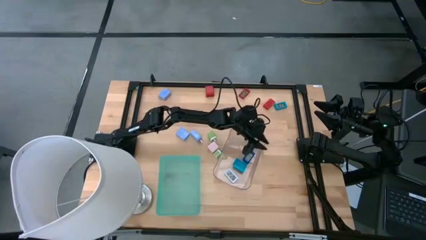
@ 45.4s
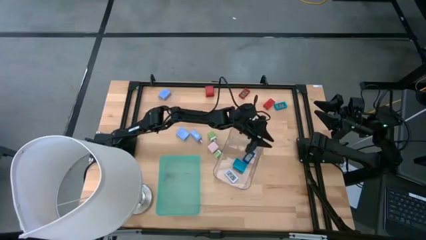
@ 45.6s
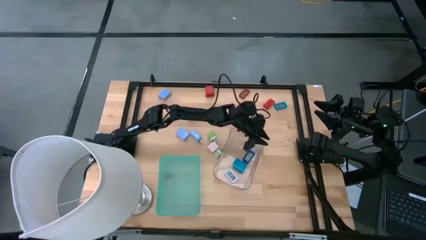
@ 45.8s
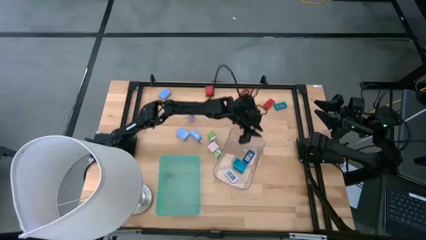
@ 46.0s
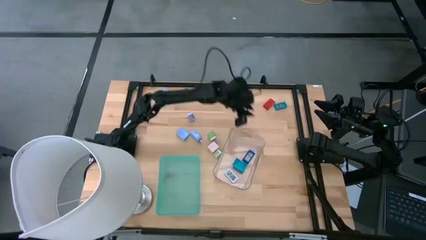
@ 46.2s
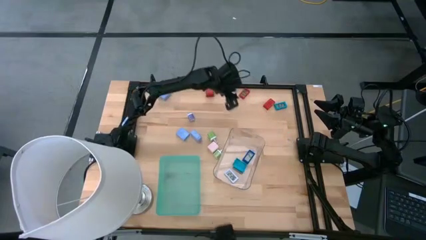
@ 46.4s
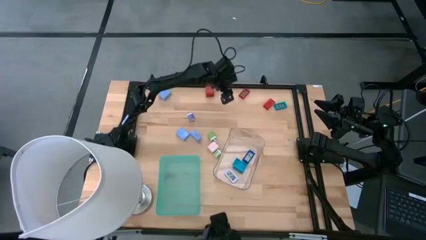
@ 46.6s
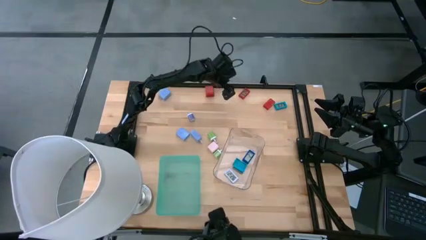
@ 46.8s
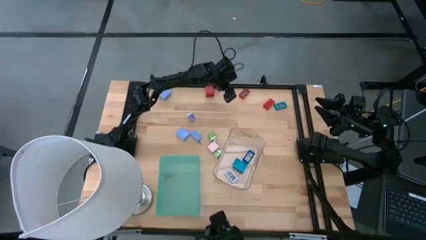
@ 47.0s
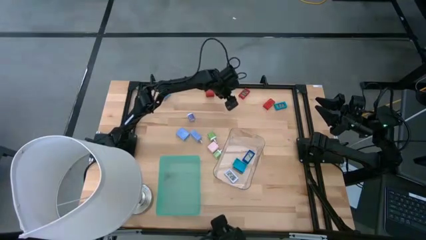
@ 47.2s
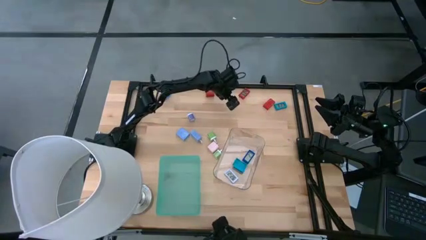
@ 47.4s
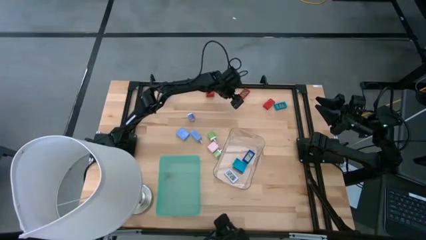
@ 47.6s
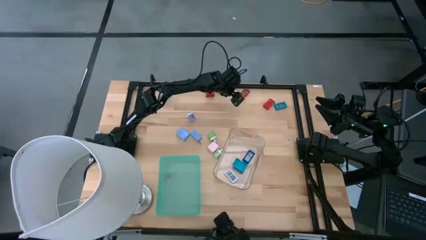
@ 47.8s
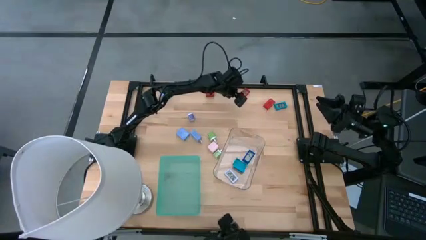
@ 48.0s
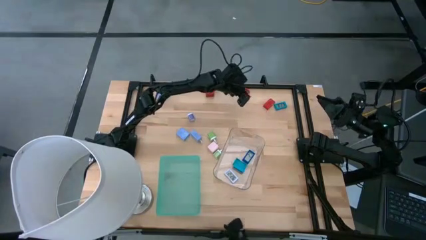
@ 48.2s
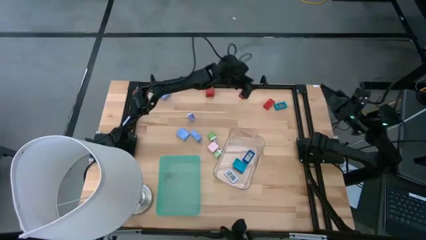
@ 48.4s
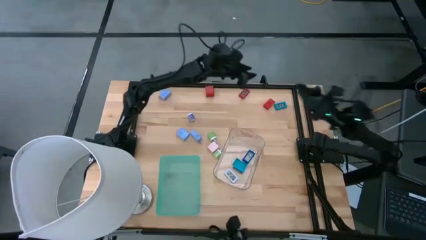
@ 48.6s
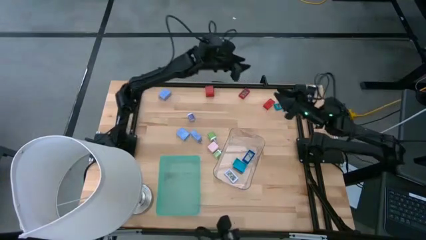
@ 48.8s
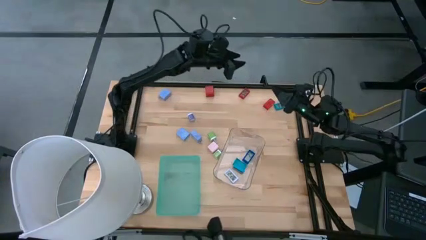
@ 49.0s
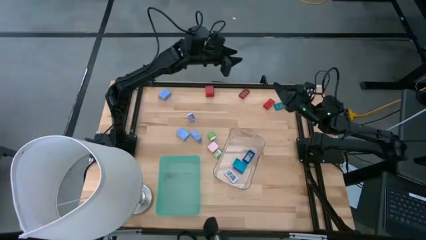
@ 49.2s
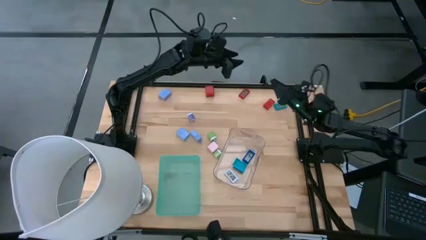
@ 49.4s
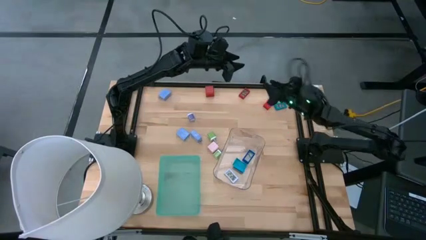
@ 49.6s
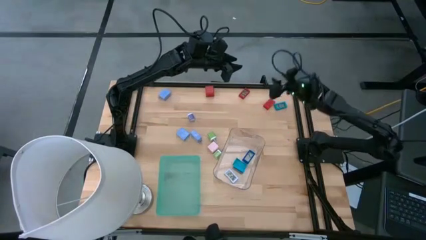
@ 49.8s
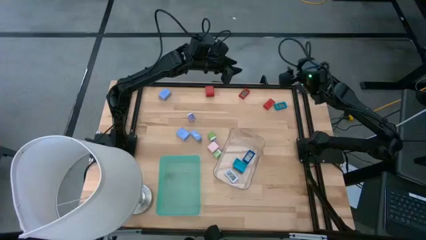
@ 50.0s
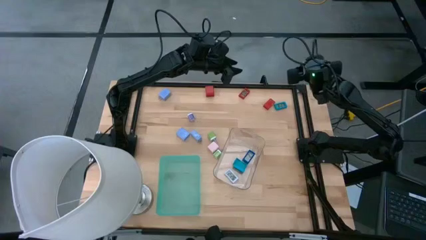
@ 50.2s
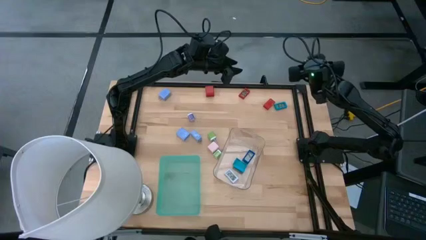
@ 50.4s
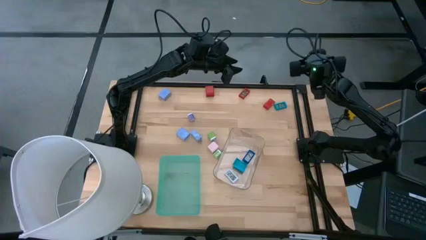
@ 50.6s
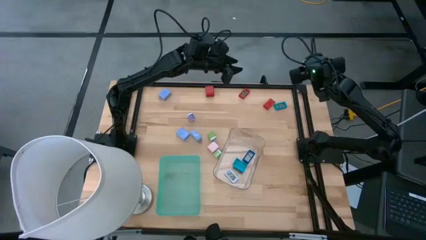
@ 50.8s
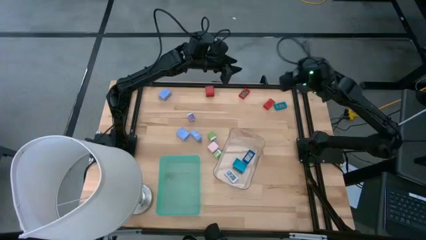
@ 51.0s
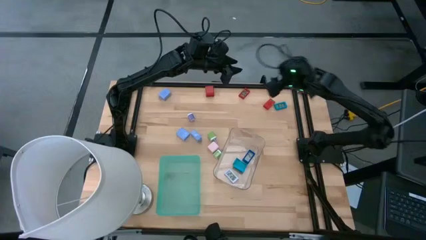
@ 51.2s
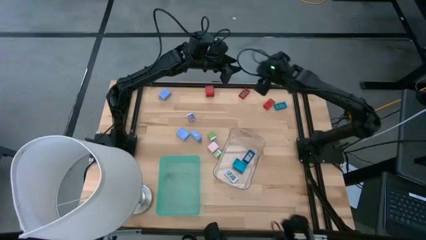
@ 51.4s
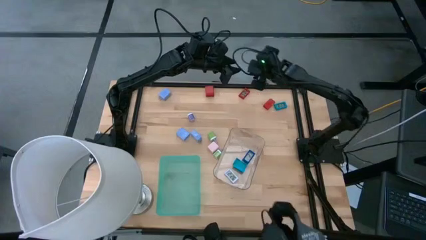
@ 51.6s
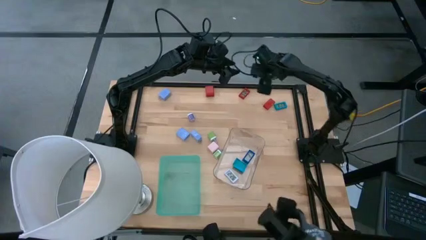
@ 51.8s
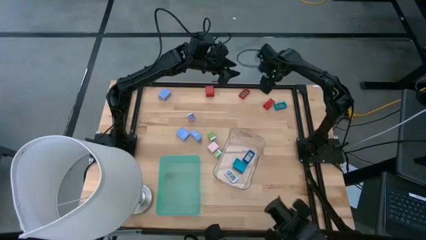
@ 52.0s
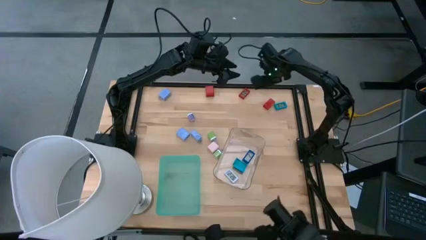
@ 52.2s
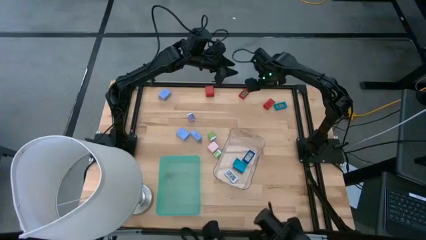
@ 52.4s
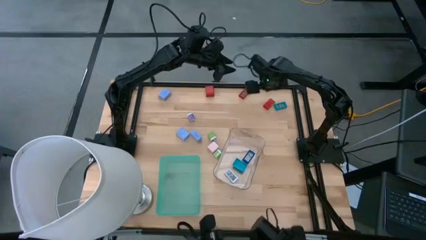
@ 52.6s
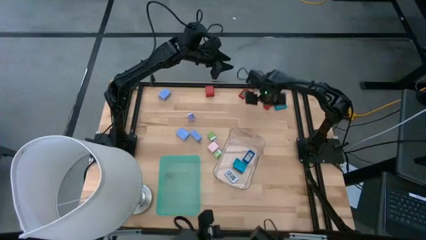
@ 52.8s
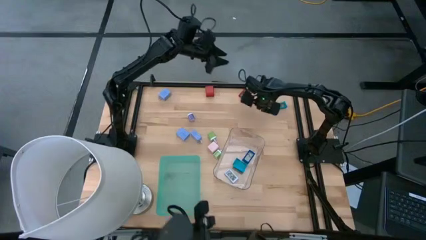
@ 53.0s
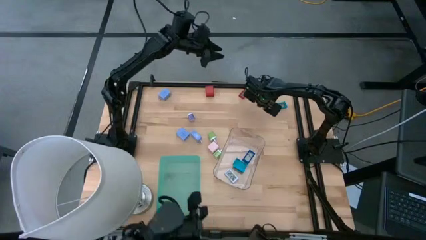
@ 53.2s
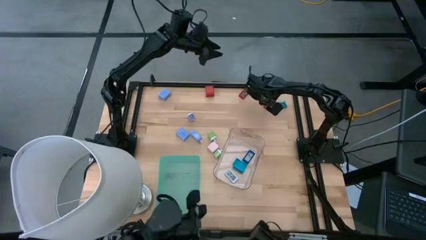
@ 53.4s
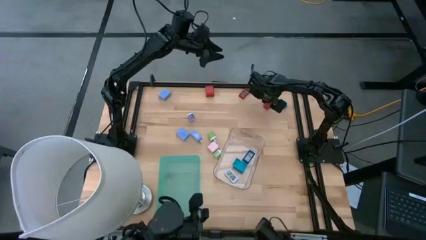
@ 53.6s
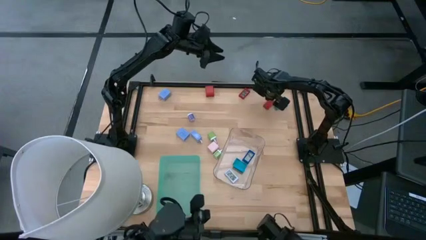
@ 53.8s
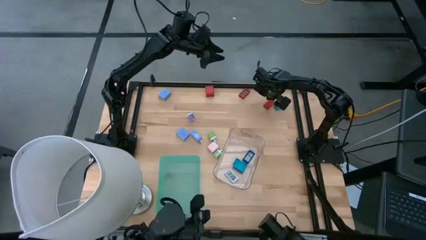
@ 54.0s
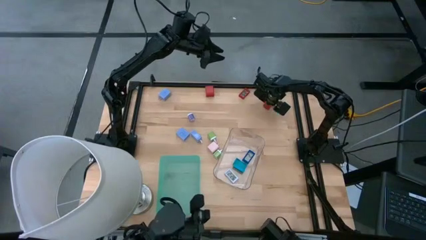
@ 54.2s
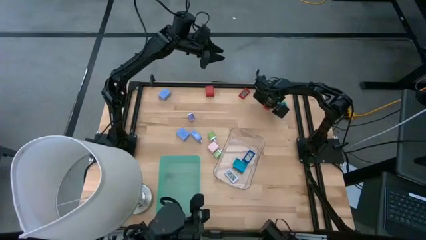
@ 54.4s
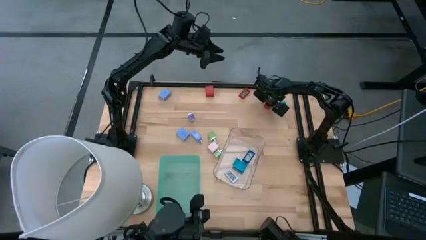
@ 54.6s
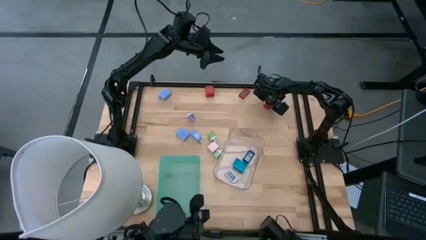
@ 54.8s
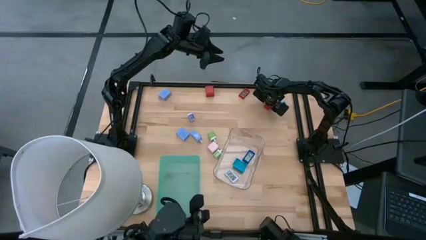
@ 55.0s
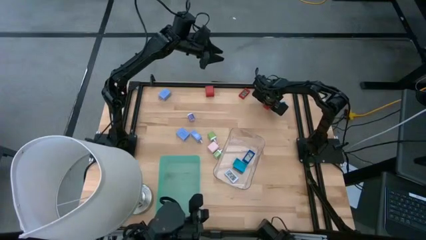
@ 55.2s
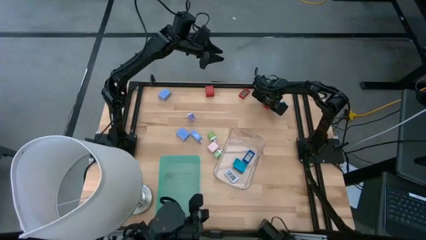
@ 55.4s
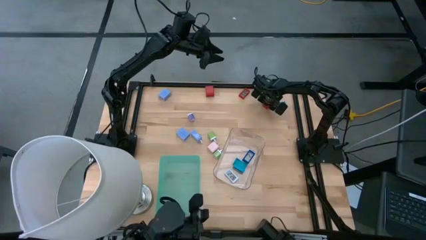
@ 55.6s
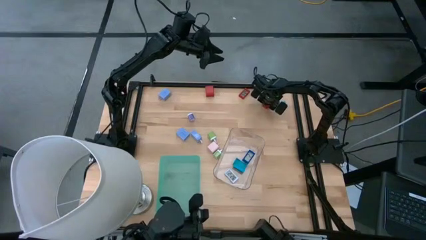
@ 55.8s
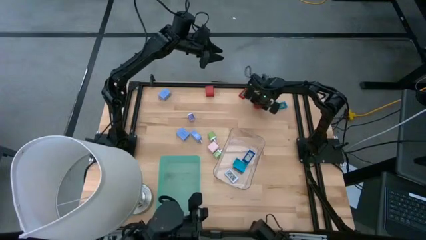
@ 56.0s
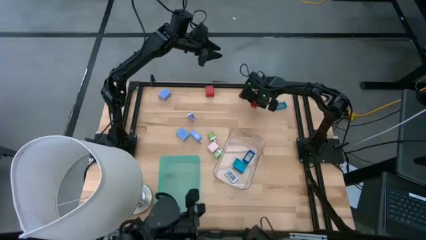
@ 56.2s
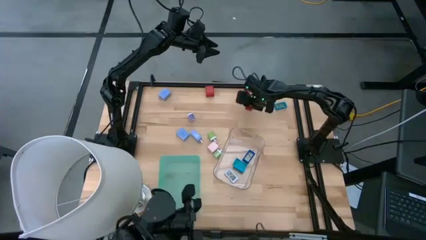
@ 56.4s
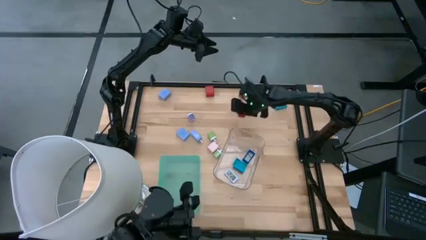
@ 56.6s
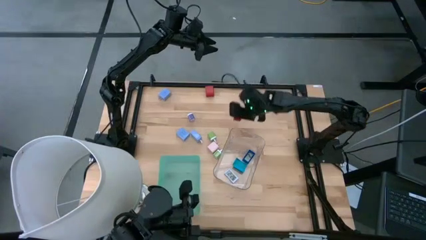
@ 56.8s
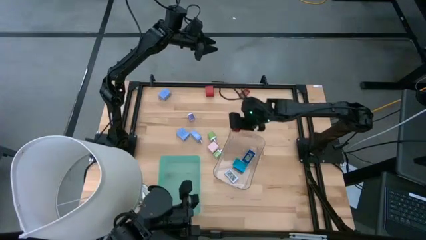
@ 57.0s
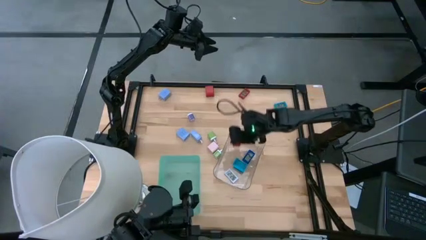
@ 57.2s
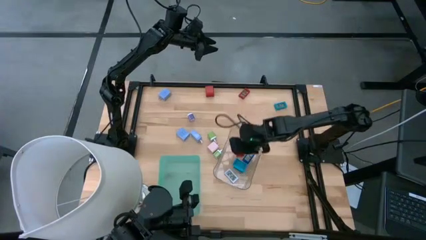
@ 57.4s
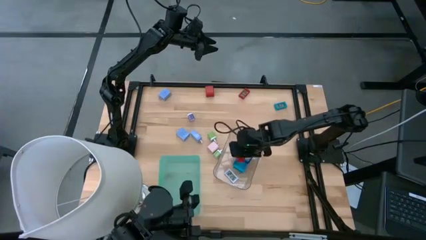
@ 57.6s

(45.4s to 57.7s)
Task: Pick & Place Office items
Put the right red digital clock into the transparent bin

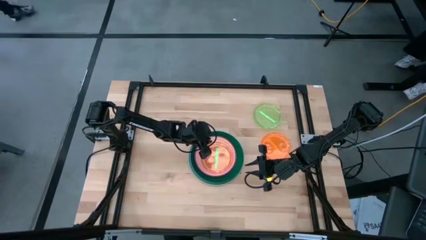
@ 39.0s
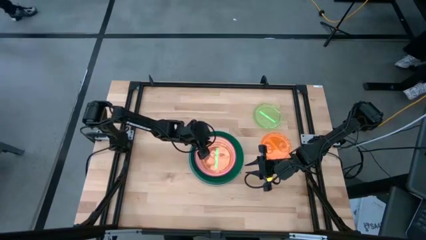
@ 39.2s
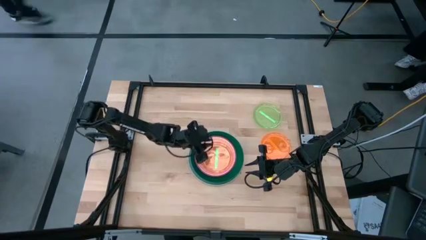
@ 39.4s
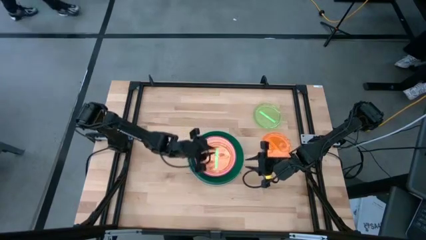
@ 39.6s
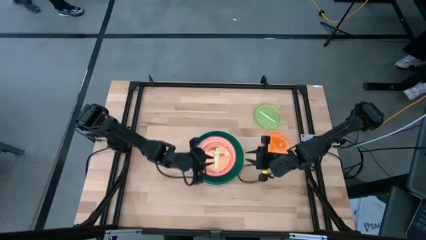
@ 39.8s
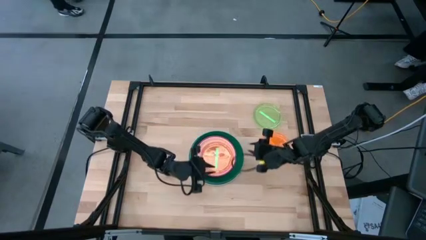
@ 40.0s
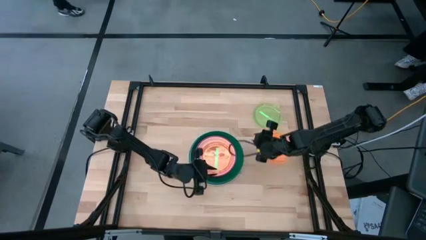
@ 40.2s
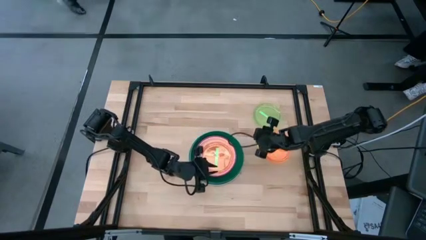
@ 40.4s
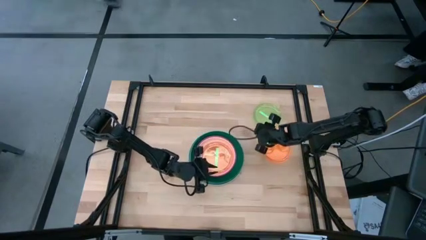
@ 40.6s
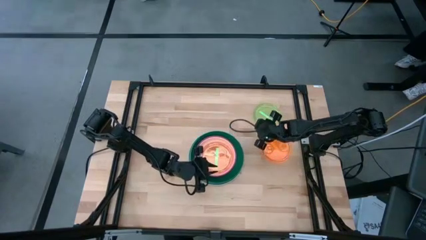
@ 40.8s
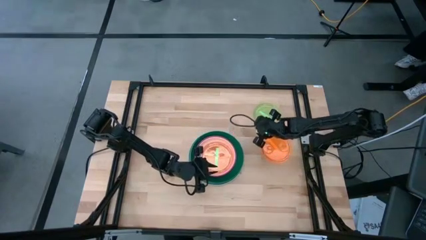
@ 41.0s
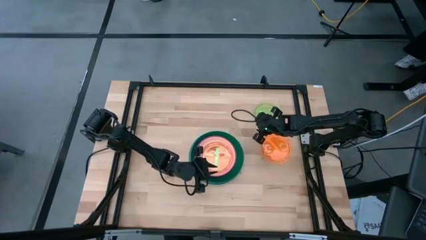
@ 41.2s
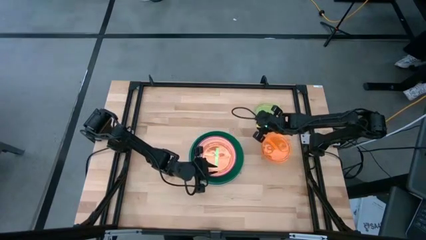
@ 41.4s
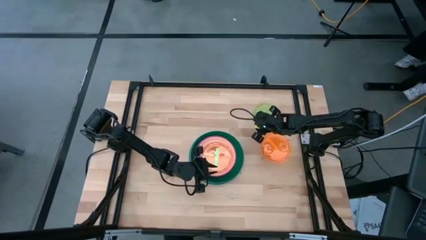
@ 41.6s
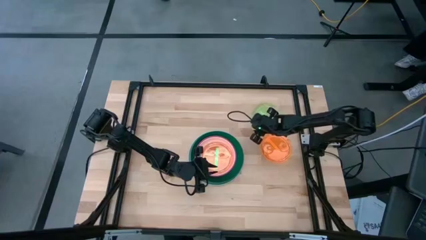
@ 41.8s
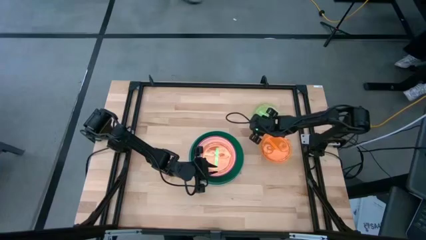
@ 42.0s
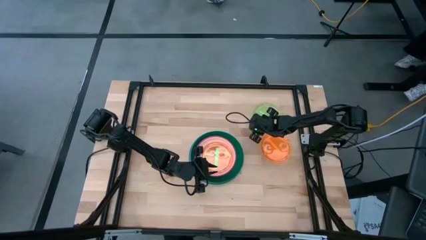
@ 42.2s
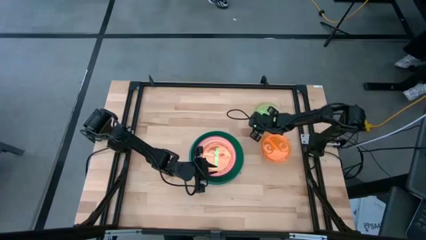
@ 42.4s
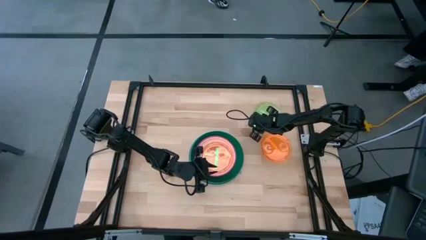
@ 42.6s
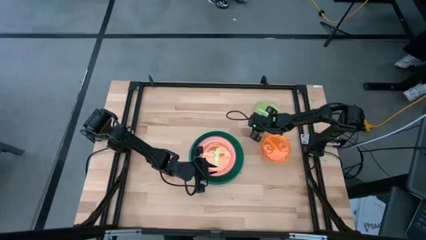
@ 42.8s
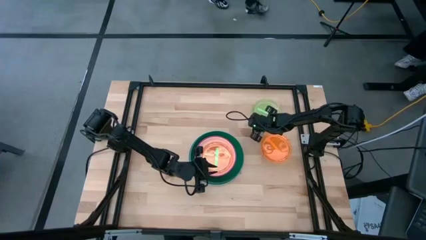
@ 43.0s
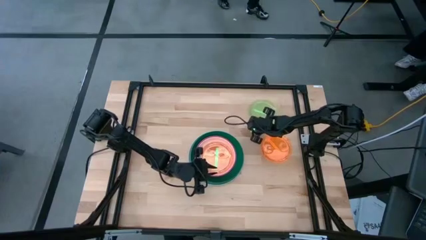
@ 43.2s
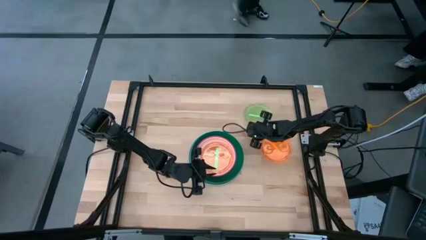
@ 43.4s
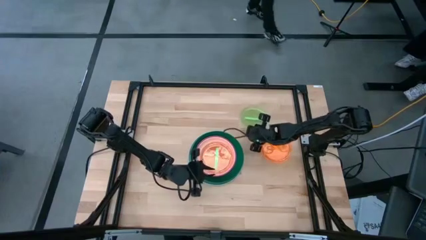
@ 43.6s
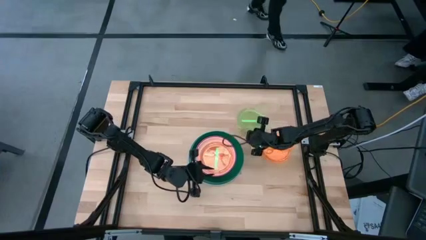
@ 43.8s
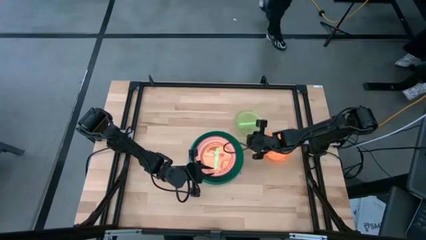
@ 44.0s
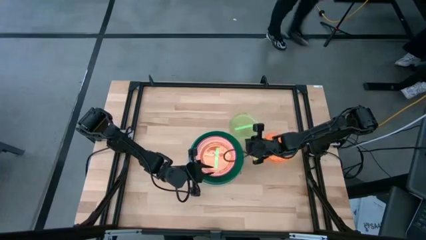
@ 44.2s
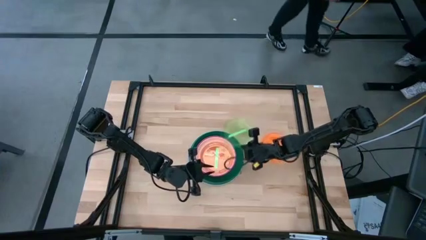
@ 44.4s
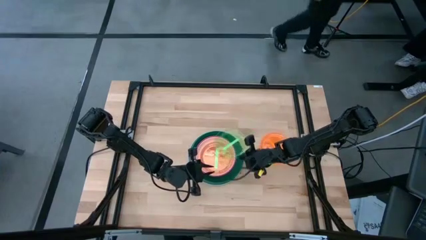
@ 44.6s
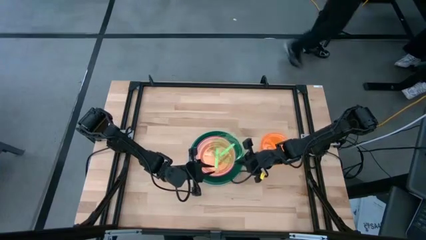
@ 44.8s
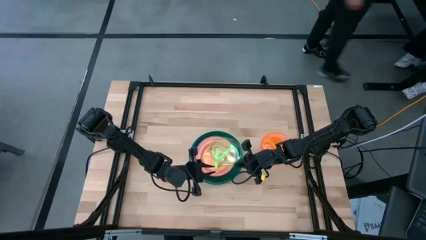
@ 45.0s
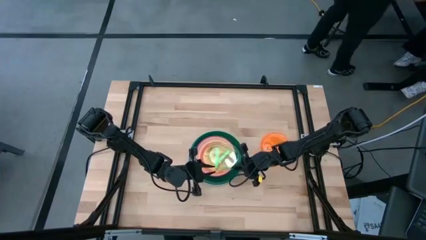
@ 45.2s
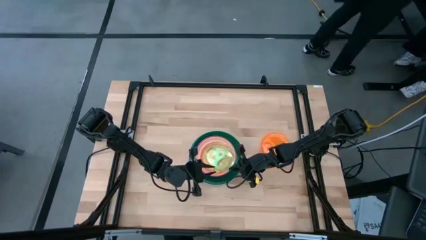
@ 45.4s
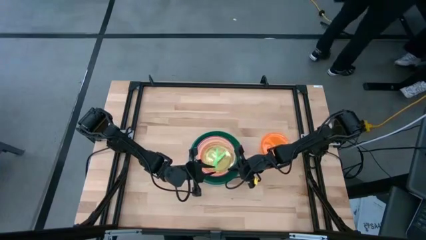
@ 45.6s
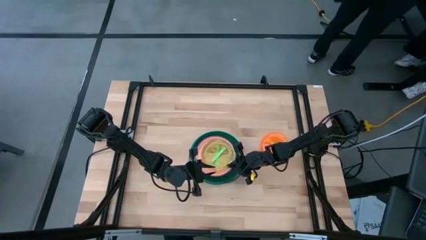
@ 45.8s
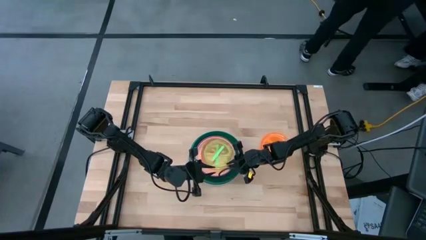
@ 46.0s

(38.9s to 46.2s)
Task: Stack plastic plates
Stack the light green plate on top of the light green plate
